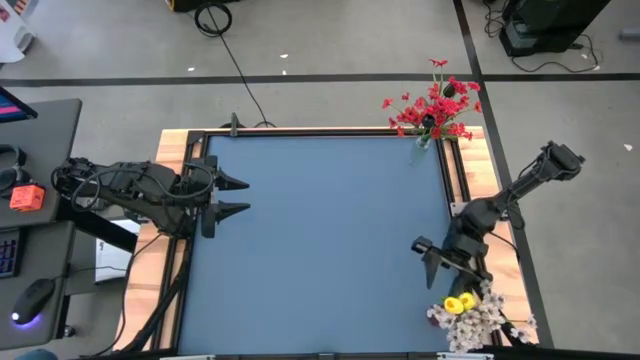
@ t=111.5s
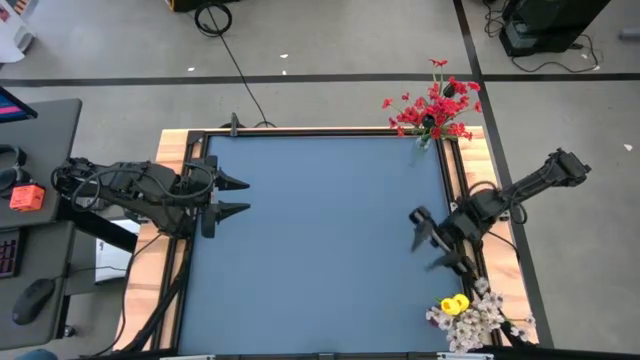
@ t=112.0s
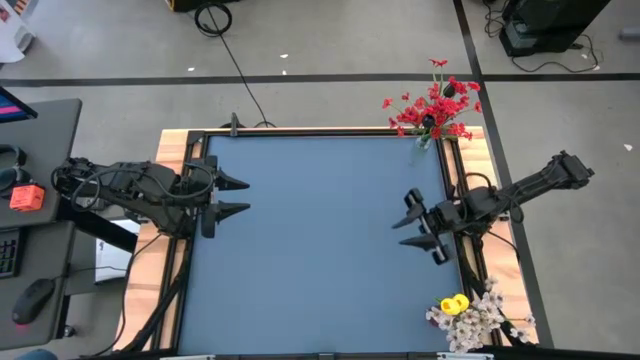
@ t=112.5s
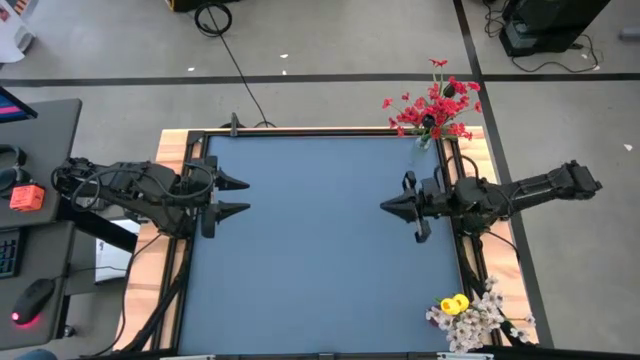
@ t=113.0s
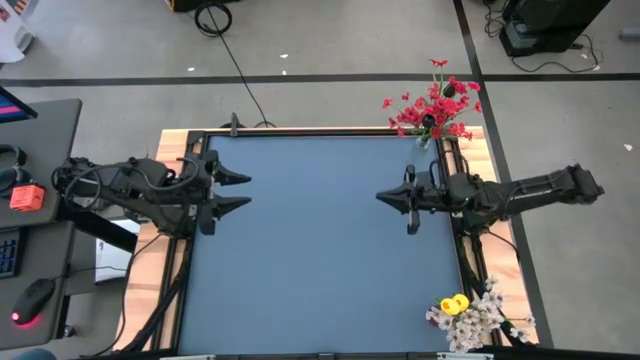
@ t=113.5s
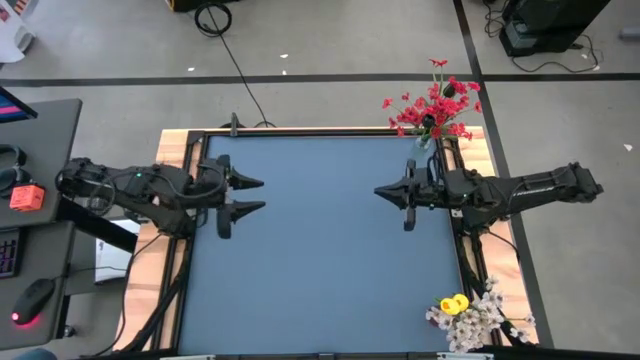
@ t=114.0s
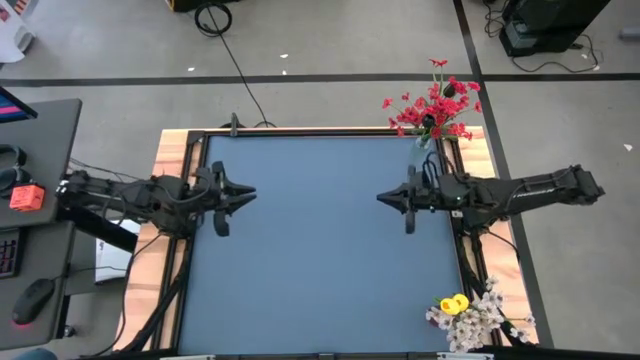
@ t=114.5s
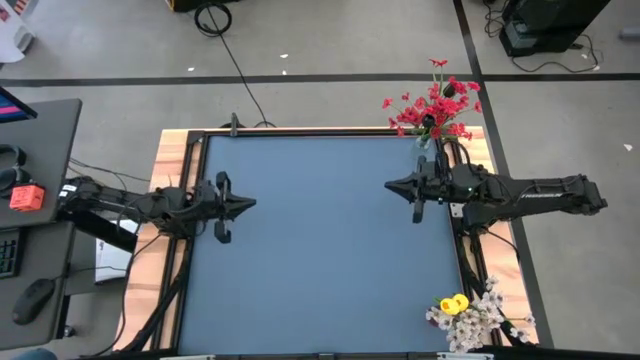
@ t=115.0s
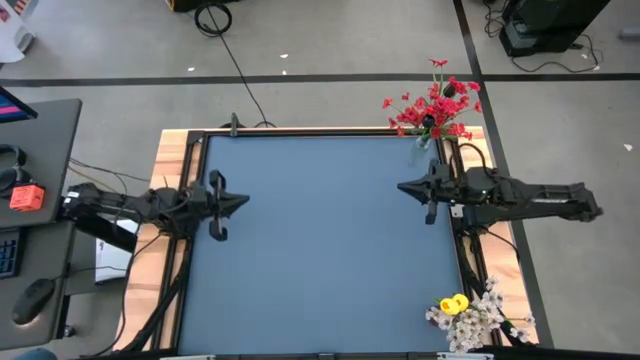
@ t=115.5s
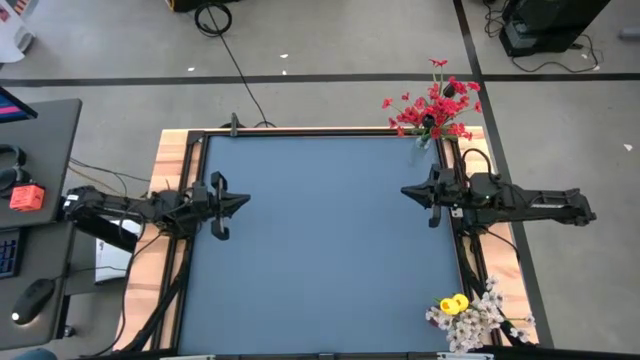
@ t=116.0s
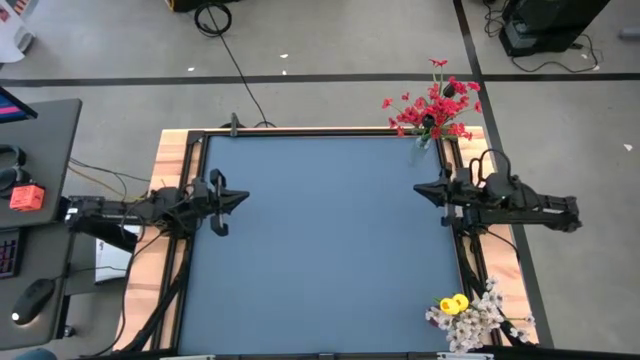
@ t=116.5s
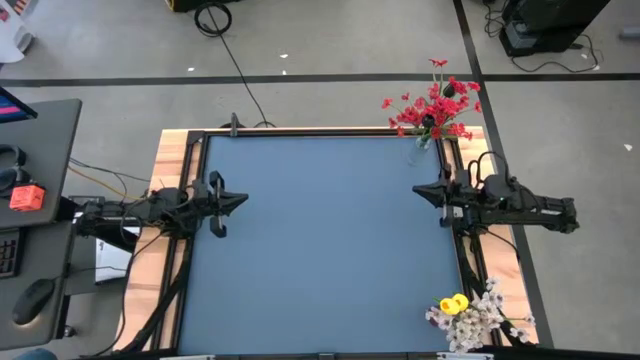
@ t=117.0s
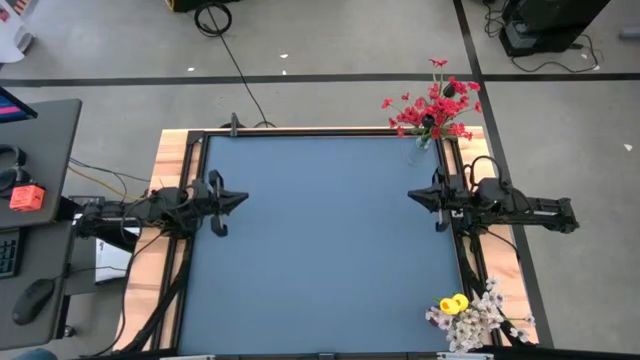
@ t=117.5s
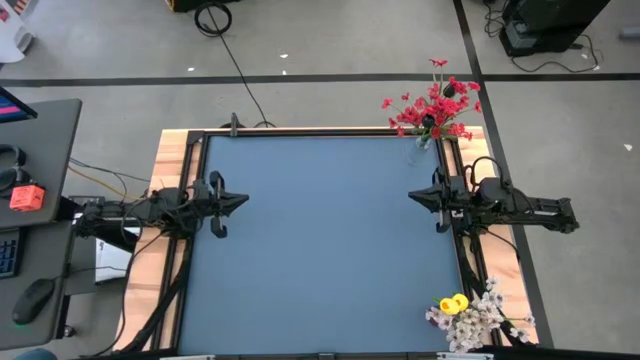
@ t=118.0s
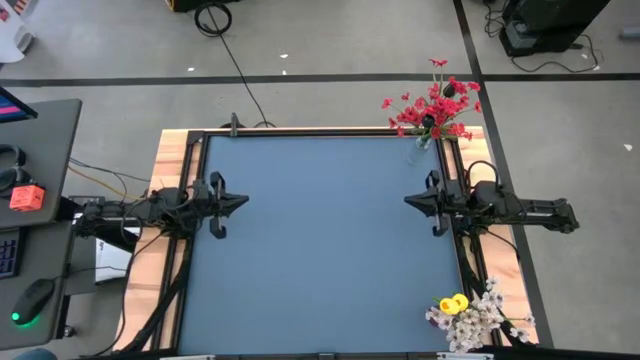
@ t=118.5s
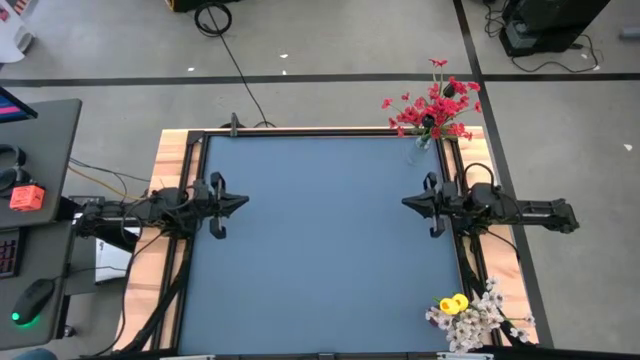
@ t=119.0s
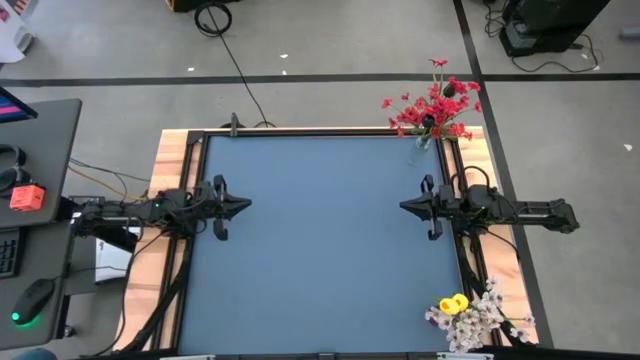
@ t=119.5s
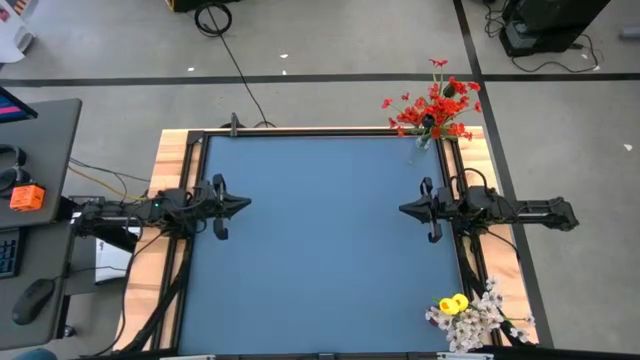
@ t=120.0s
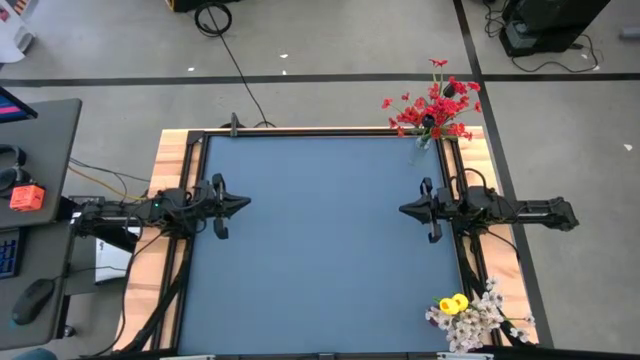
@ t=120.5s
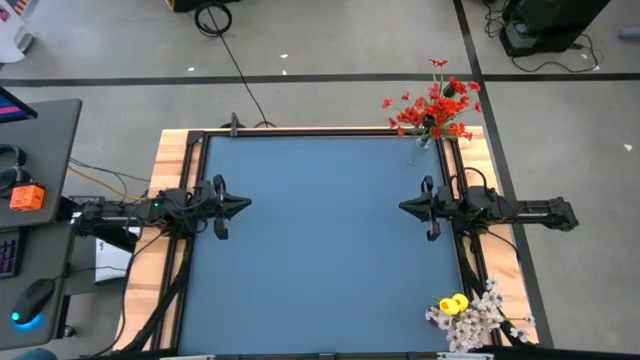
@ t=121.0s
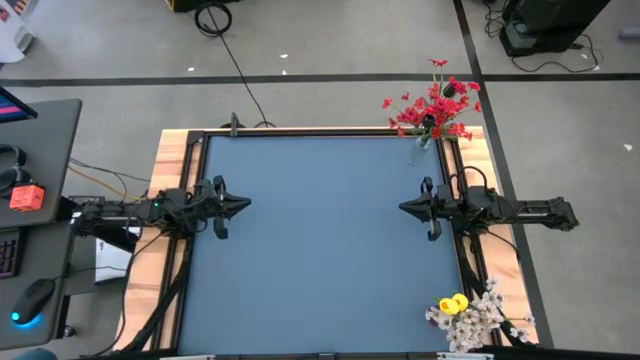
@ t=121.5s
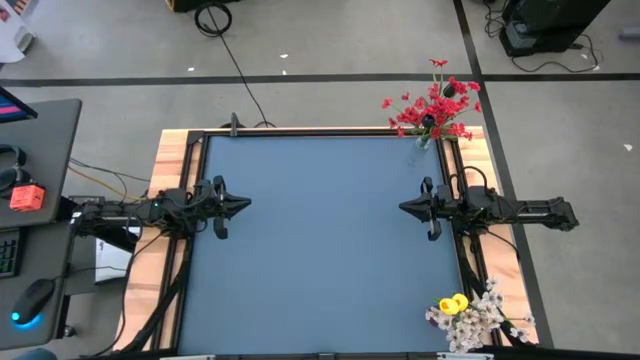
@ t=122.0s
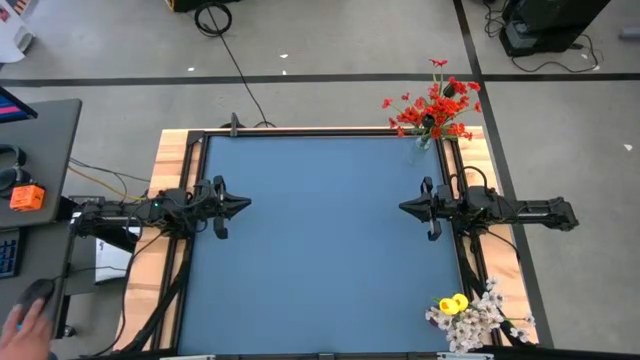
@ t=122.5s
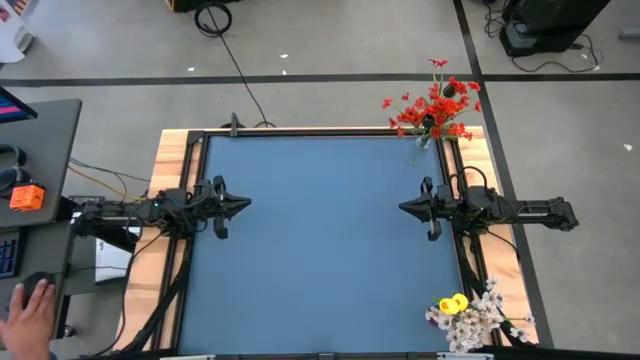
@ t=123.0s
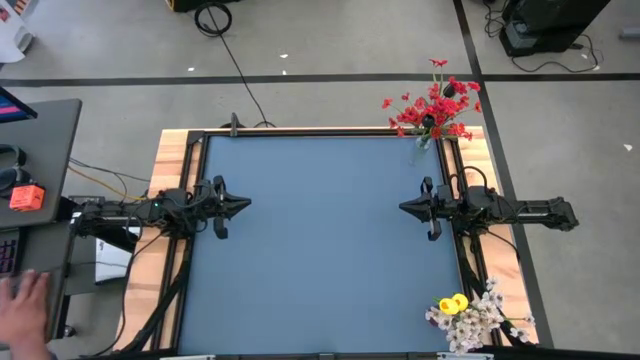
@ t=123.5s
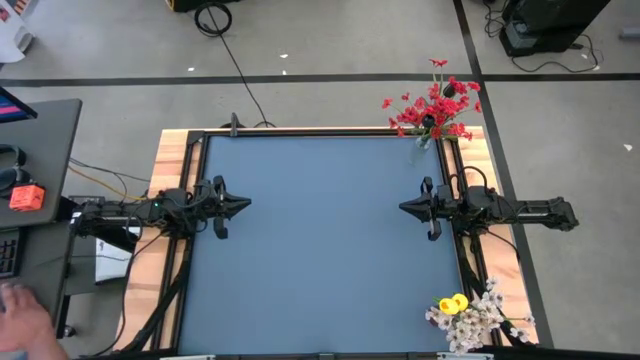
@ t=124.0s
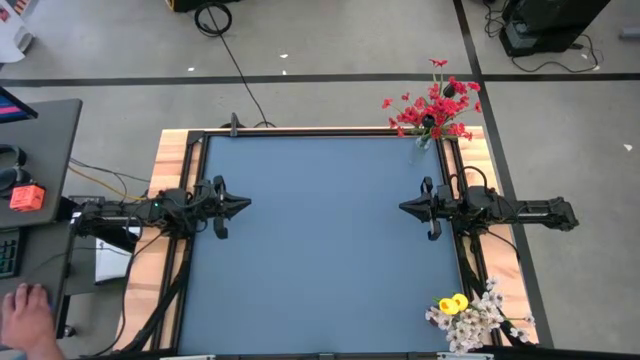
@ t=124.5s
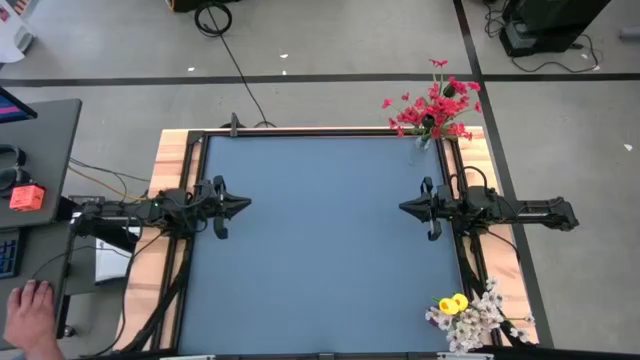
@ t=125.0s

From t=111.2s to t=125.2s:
Task: Sort flowers into vase by color
Return to Home Position

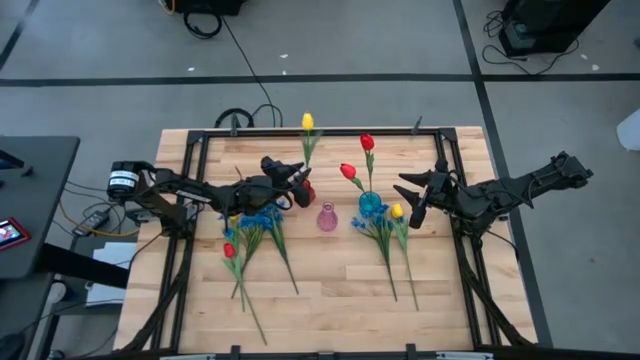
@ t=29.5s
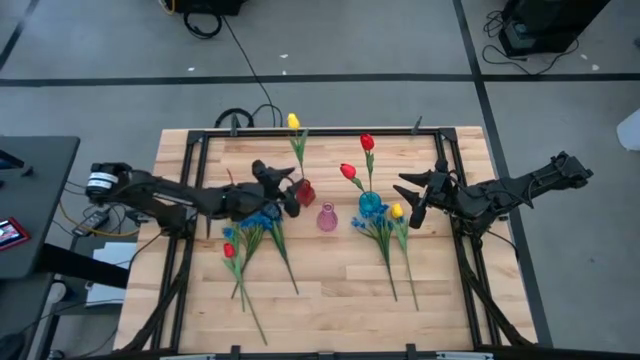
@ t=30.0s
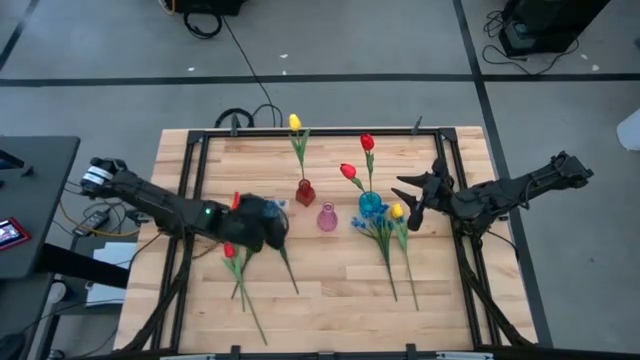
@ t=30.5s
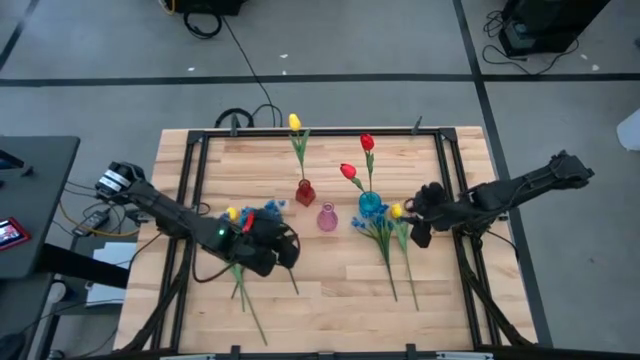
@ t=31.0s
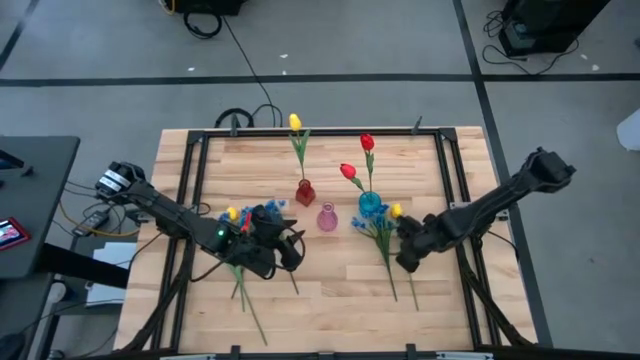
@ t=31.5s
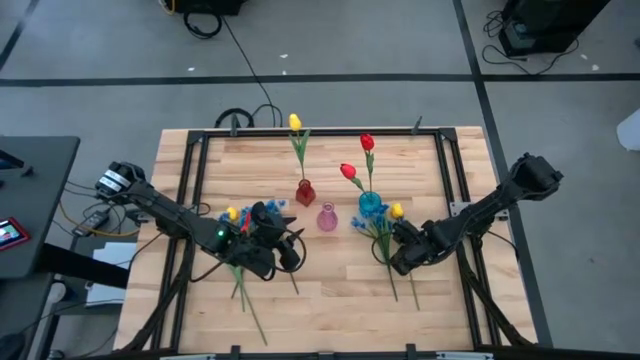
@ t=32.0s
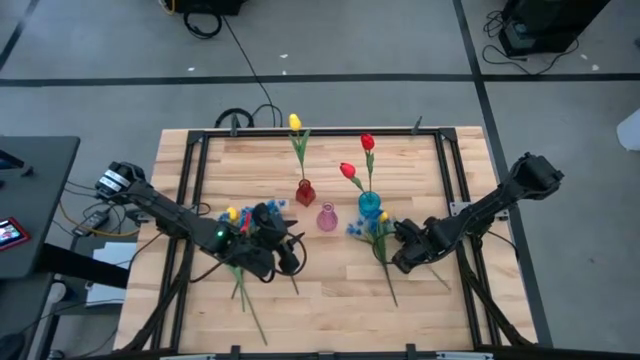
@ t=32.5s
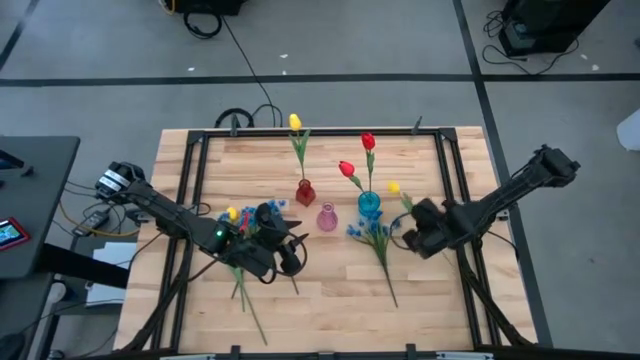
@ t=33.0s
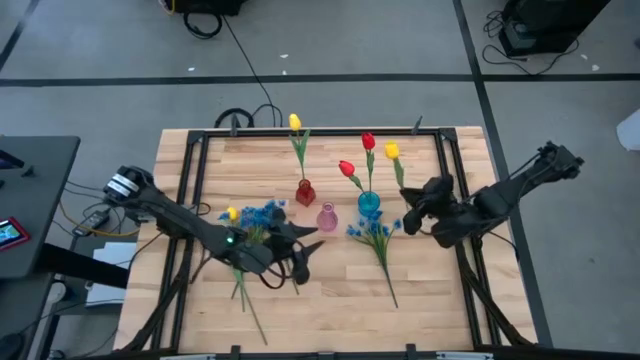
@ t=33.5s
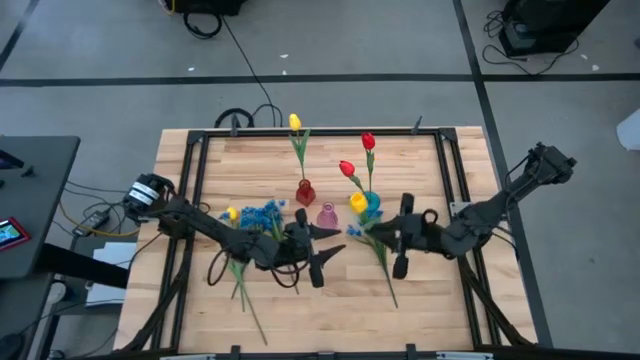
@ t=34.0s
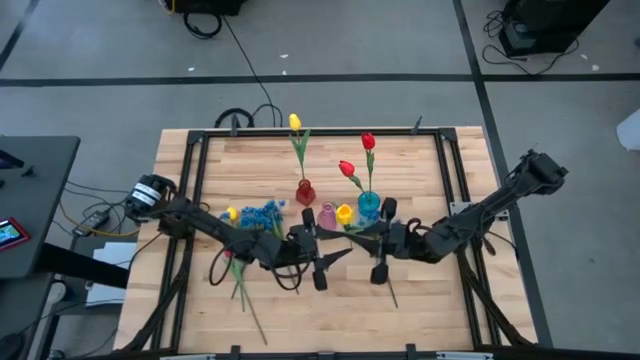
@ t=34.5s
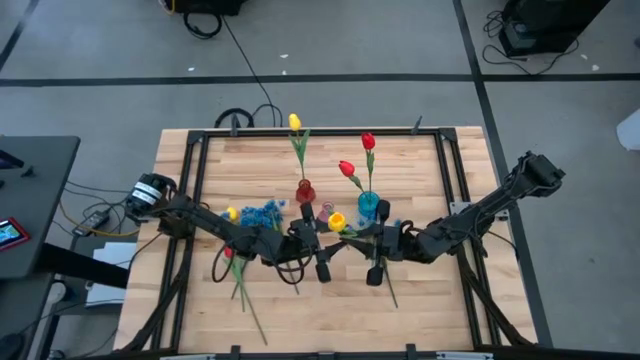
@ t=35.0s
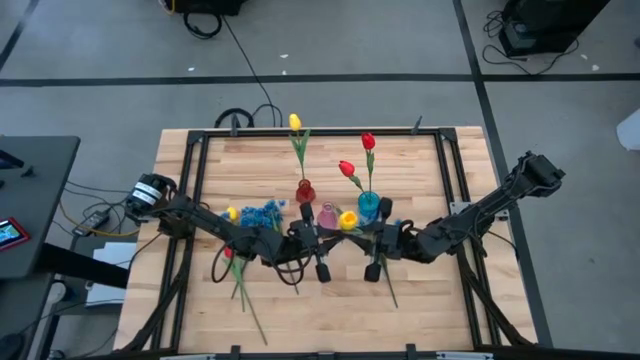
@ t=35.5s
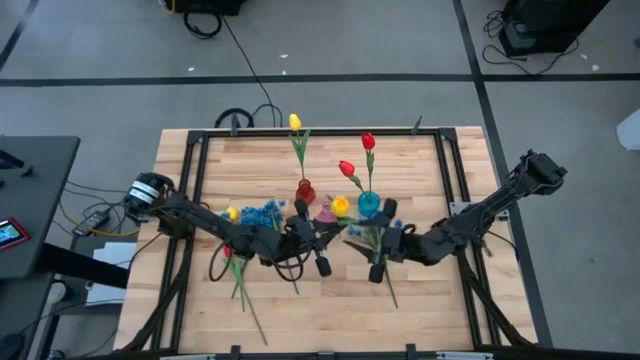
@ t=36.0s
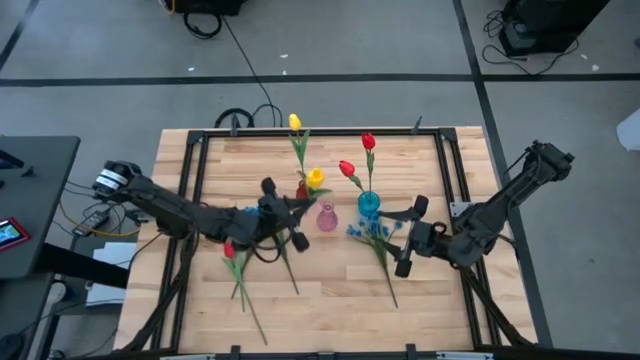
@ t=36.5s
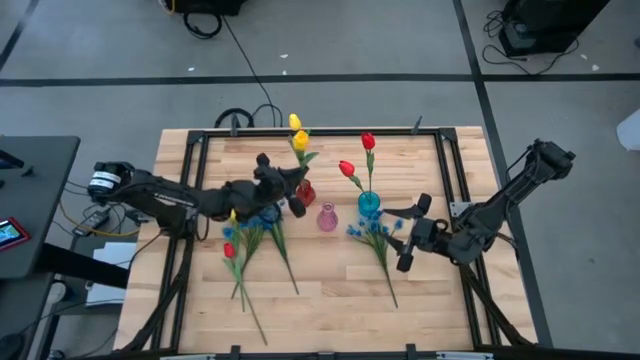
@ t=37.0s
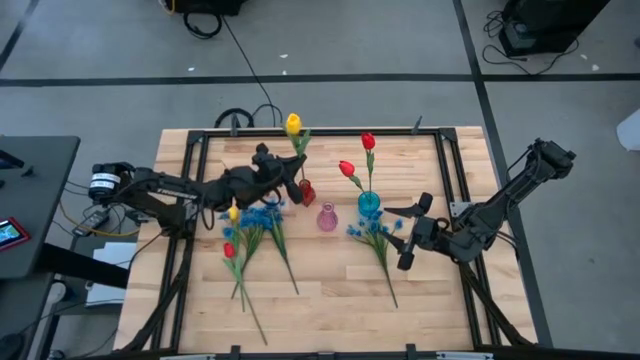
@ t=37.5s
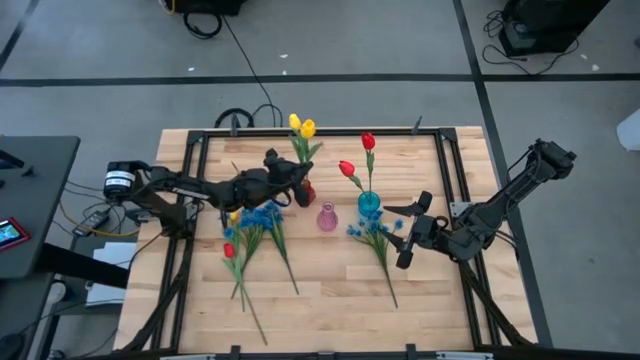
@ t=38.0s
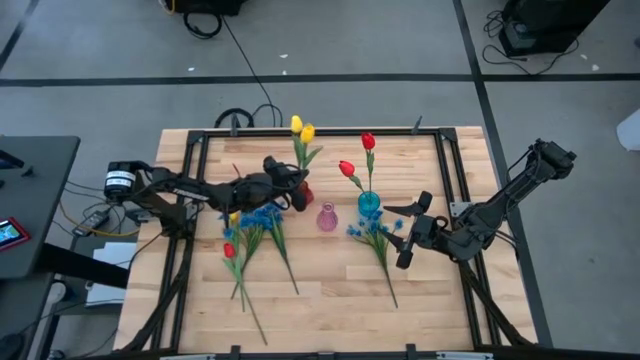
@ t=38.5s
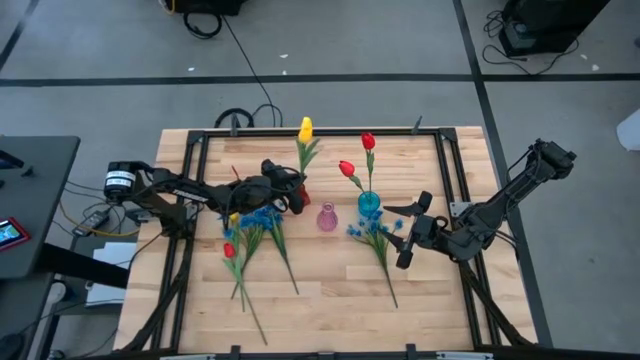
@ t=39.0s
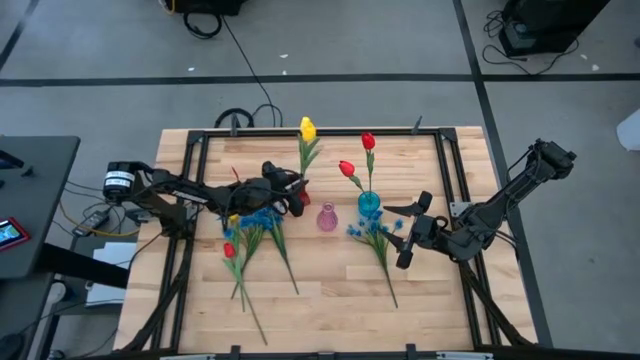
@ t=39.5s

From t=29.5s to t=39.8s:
Task: Sort flowers into vase by color
Put the yellow tulip into the red transparent vase
